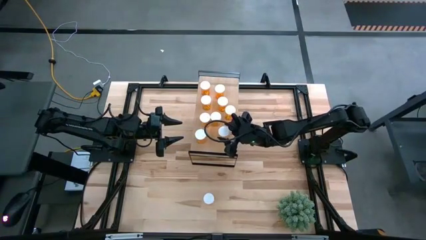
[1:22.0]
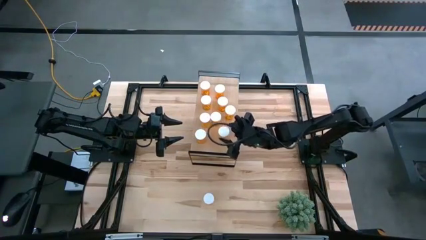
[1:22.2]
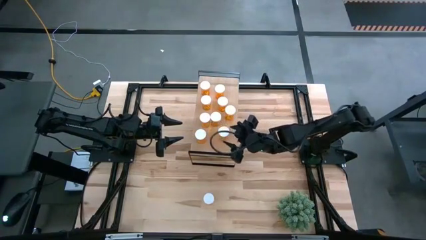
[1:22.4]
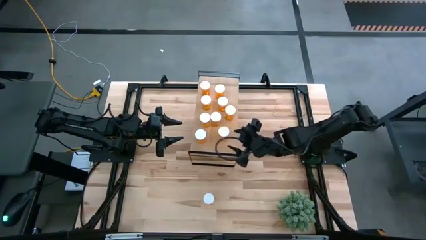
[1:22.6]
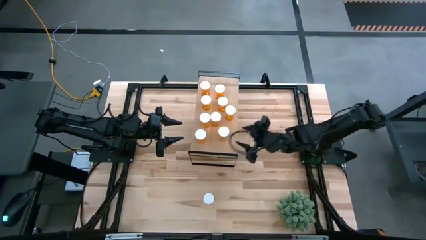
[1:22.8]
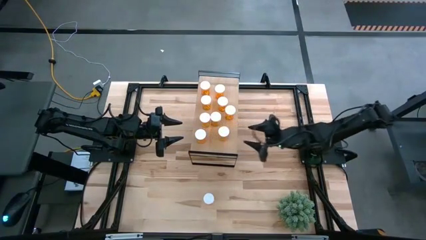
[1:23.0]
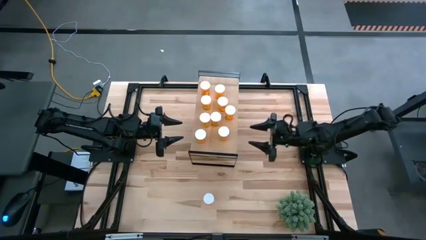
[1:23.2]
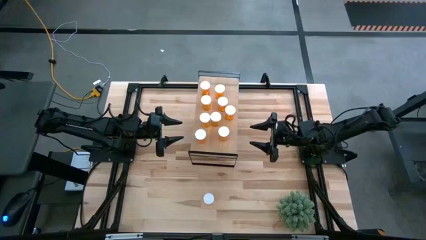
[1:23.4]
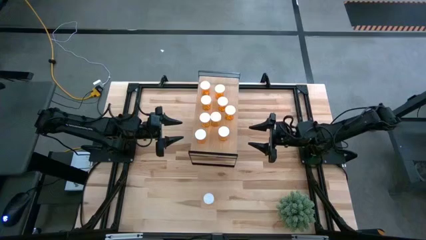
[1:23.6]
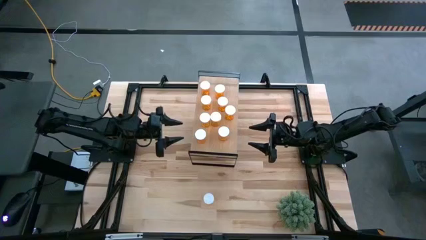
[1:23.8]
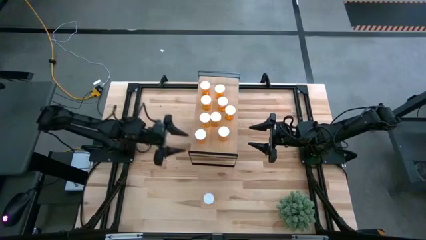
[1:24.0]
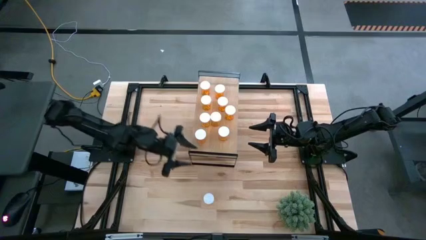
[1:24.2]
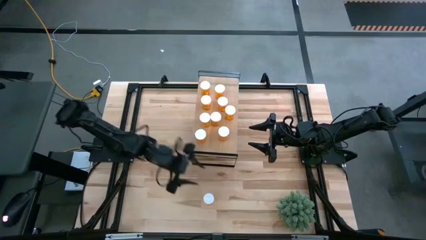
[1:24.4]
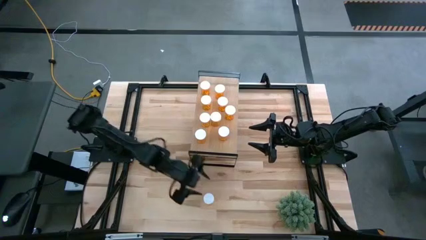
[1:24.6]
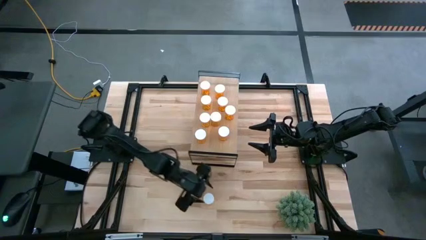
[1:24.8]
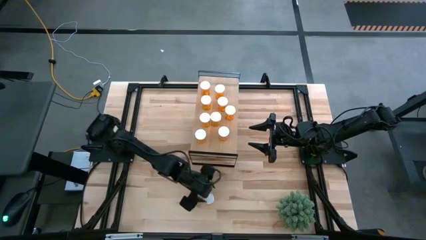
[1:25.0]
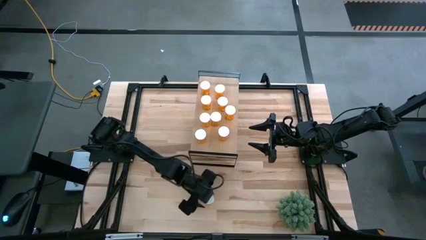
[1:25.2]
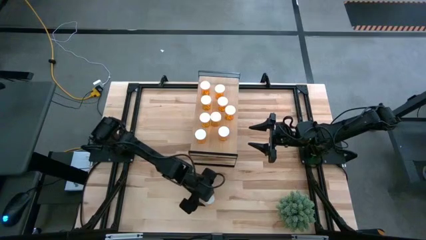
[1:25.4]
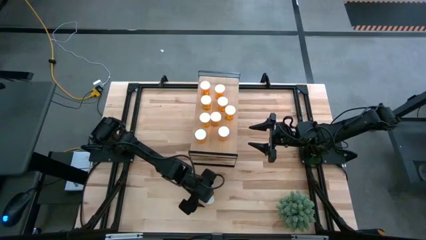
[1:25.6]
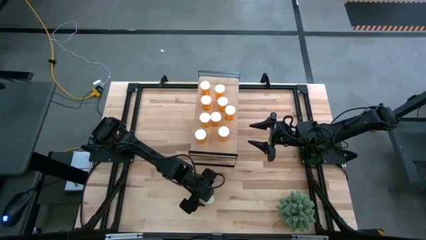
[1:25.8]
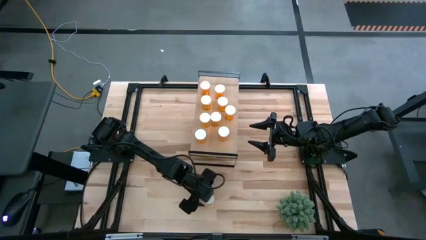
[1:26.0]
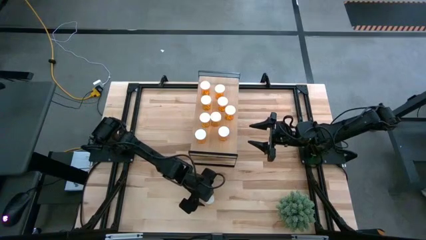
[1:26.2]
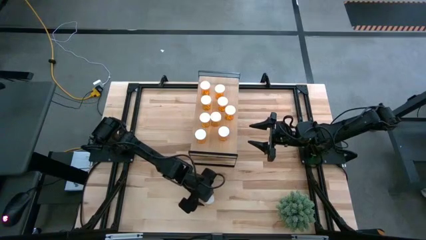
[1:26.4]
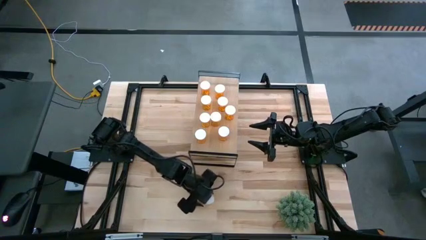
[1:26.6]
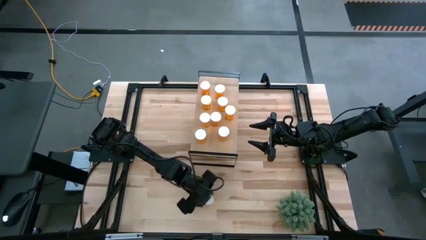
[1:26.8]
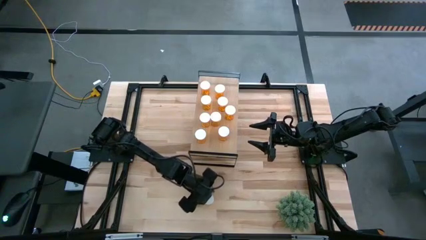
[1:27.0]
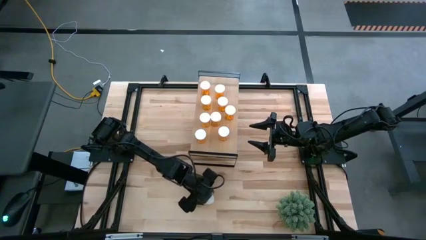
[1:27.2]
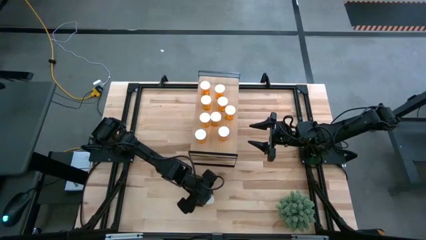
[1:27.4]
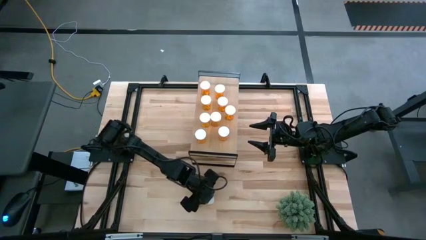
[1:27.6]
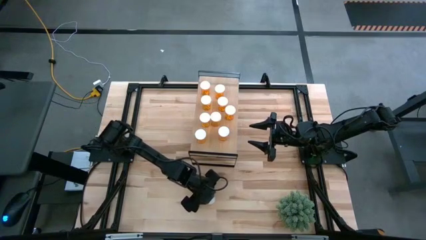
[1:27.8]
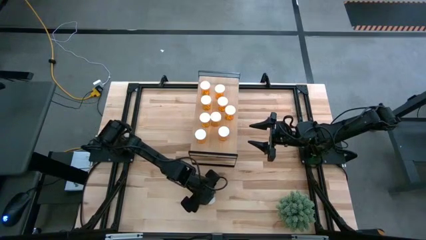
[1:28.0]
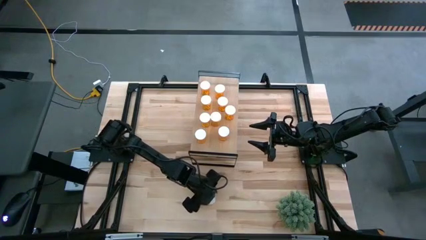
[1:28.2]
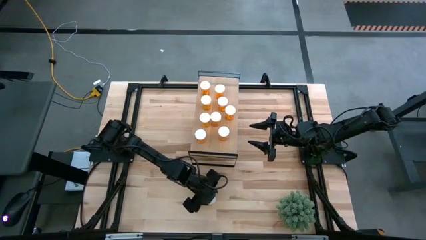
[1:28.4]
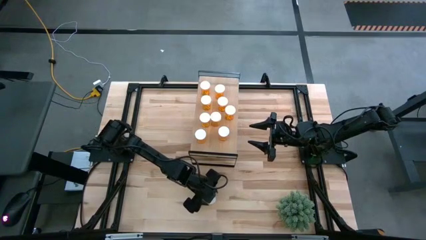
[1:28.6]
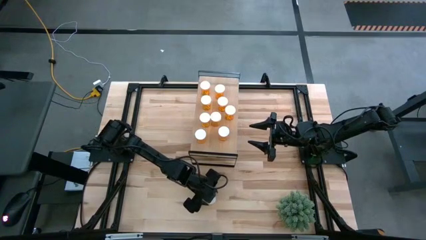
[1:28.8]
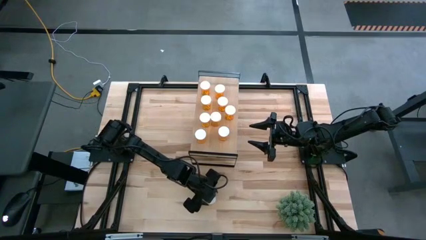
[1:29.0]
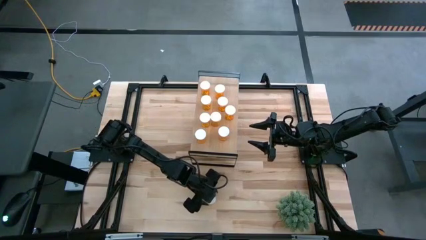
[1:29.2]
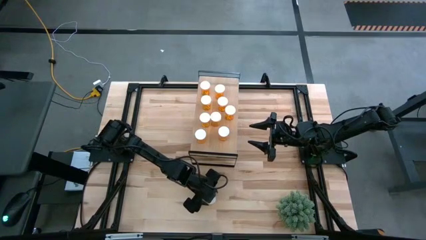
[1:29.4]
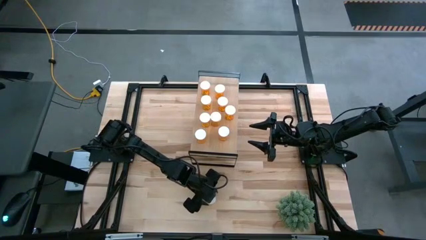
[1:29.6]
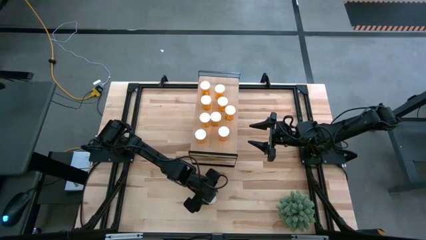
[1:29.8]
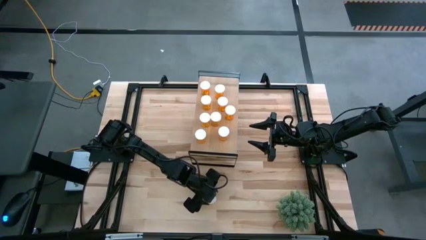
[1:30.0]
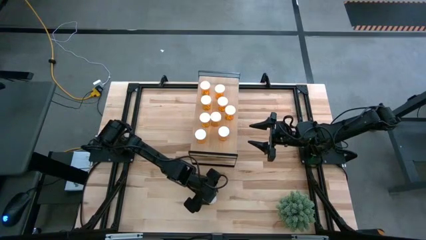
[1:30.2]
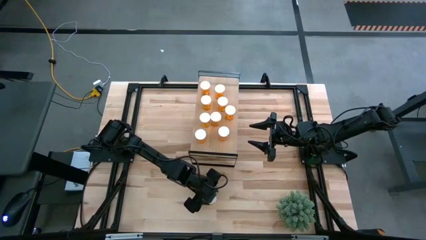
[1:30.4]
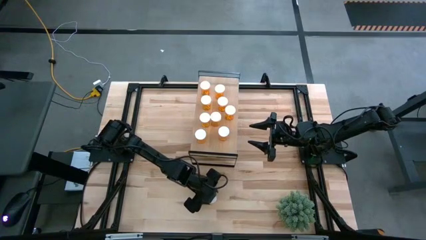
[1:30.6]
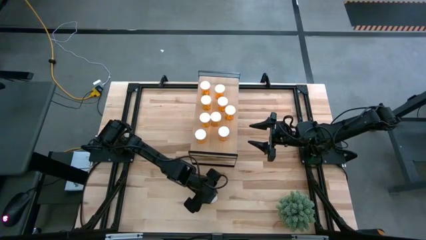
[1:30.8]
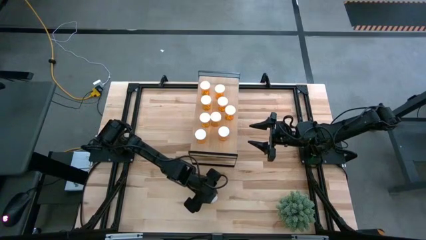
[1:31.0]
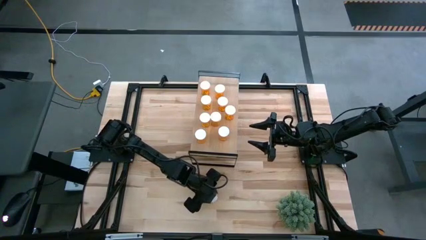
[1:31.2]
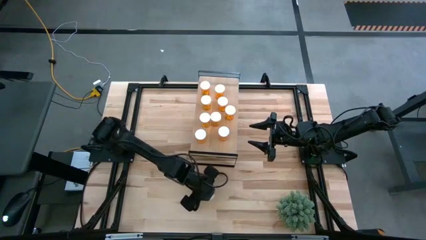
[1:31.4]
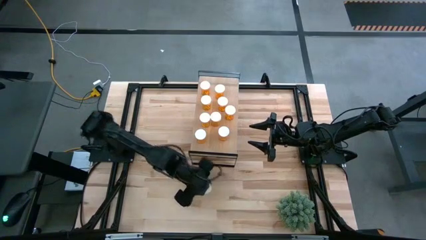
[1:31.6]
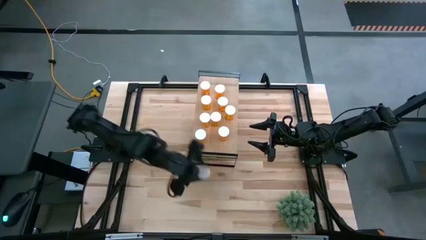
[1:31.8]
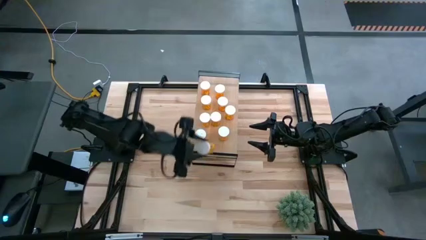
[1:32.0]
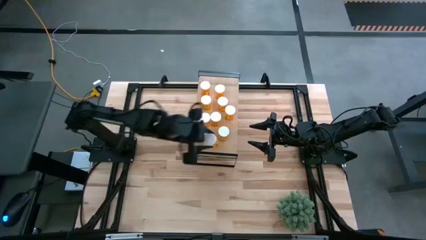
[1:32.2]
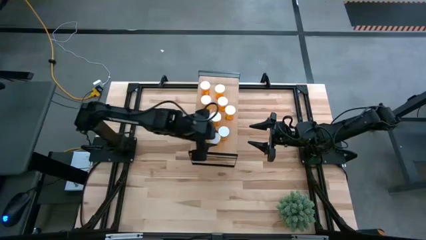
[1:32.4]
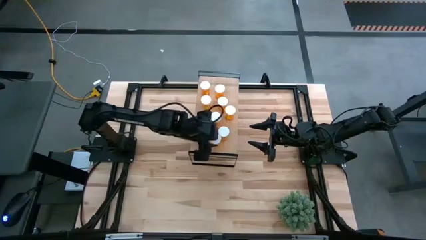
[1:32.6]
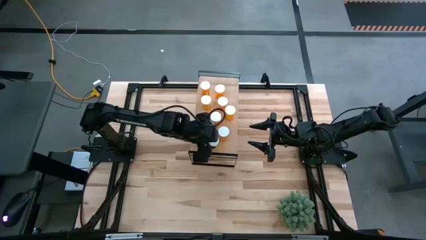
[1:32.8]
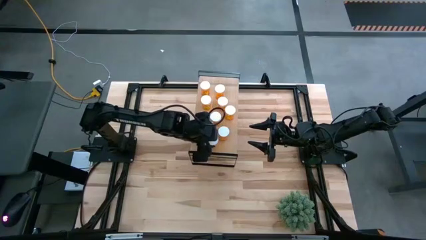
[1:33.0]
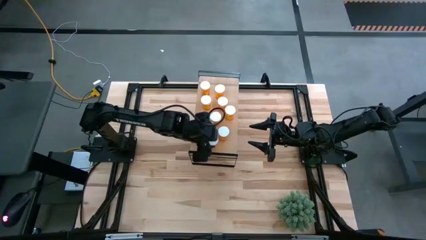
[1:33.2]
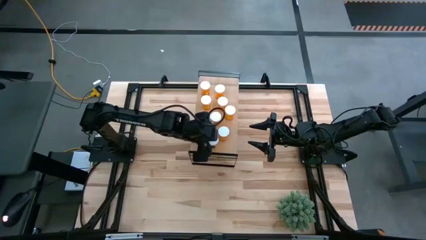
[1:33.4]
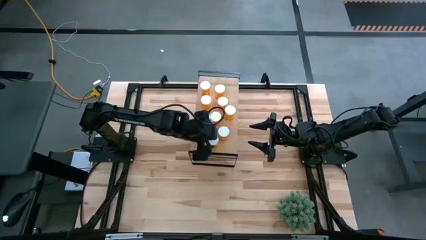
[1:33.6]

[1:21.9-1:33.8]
Task: Pick and place medicine bottles onto shelf by color
Put the orange pill bottle on the shelf

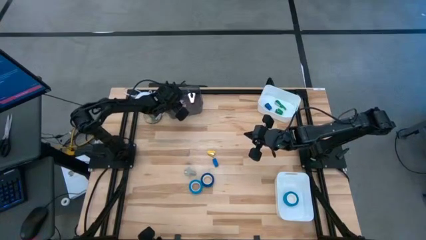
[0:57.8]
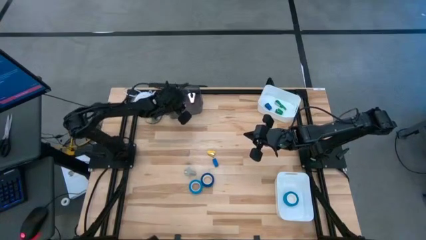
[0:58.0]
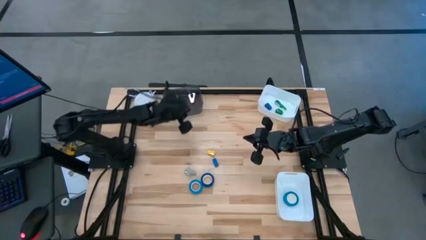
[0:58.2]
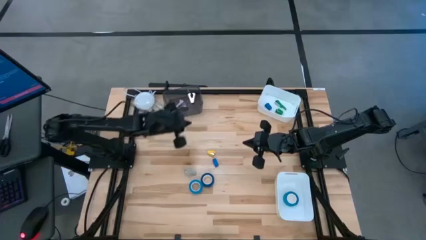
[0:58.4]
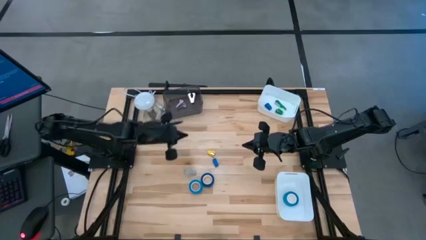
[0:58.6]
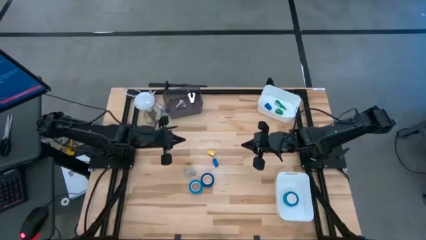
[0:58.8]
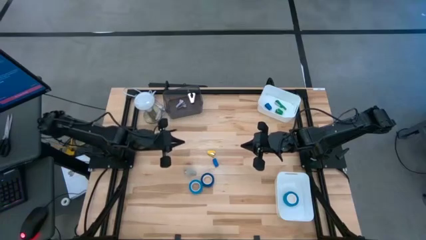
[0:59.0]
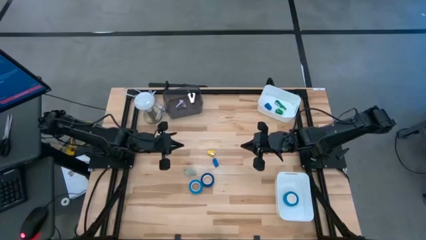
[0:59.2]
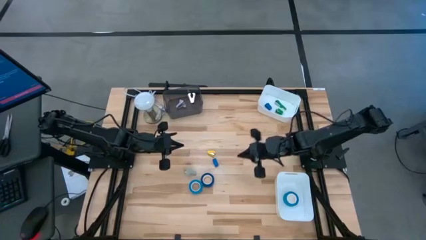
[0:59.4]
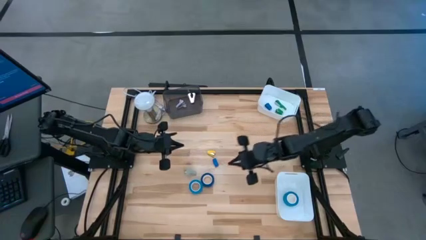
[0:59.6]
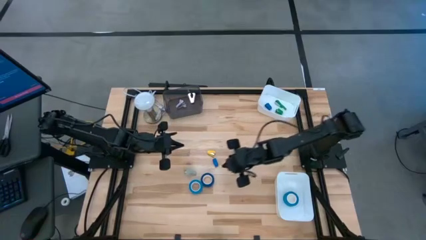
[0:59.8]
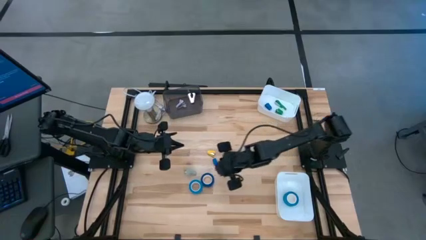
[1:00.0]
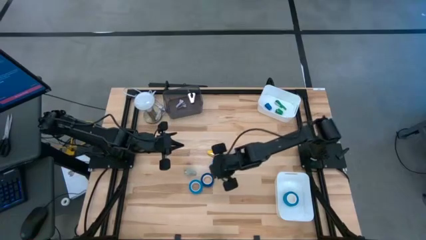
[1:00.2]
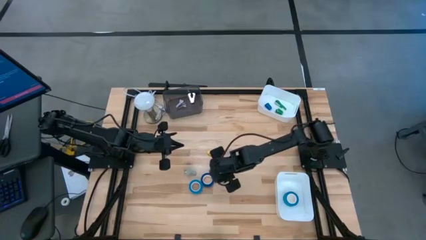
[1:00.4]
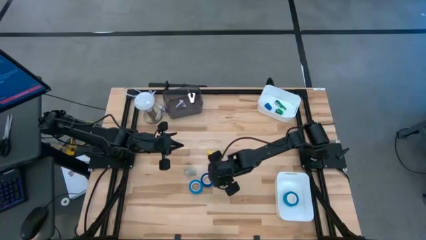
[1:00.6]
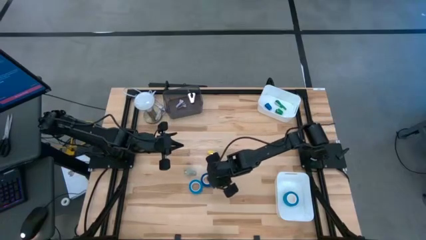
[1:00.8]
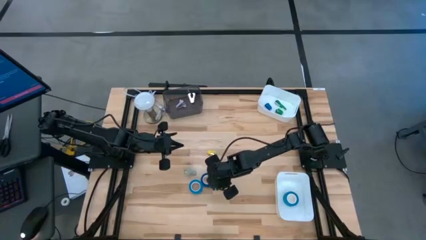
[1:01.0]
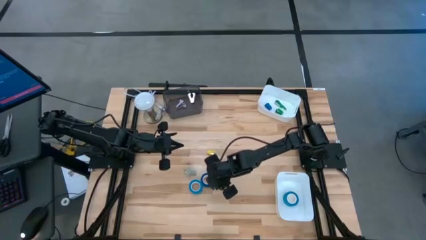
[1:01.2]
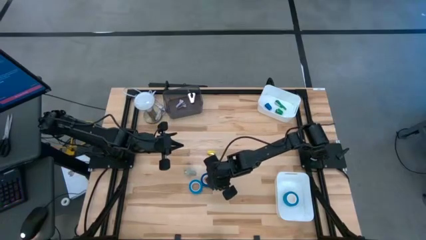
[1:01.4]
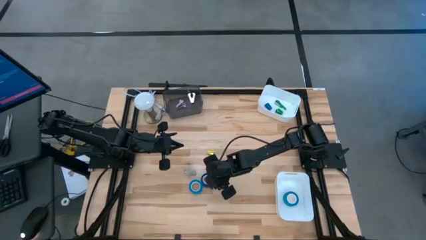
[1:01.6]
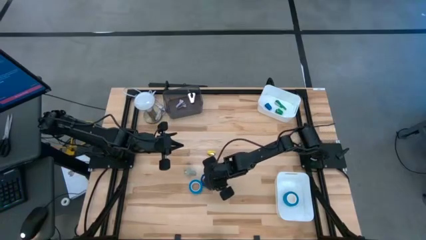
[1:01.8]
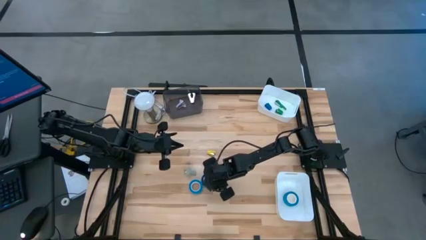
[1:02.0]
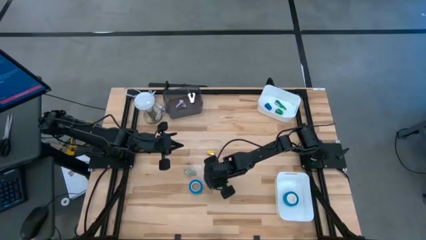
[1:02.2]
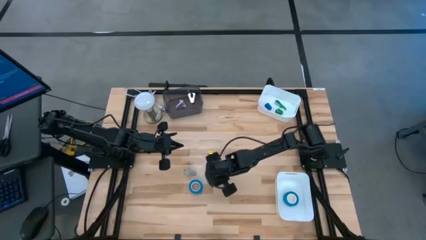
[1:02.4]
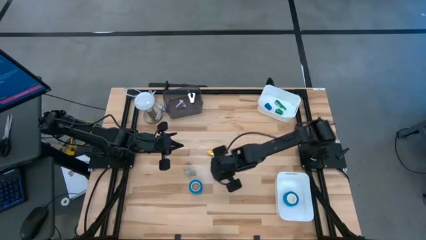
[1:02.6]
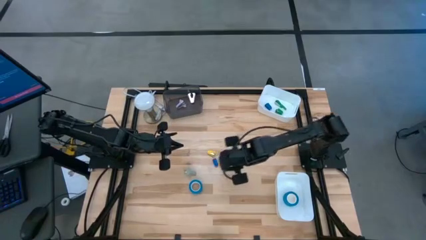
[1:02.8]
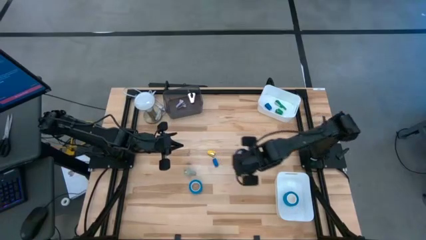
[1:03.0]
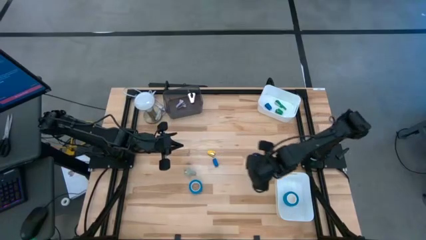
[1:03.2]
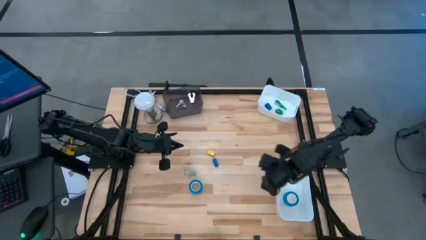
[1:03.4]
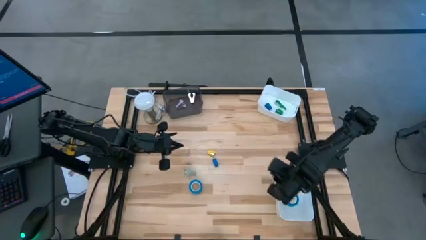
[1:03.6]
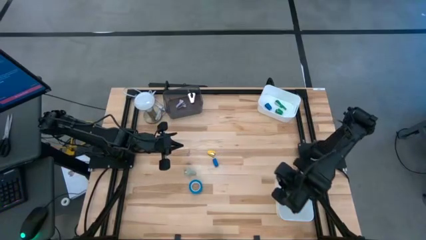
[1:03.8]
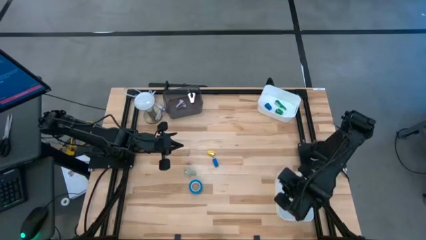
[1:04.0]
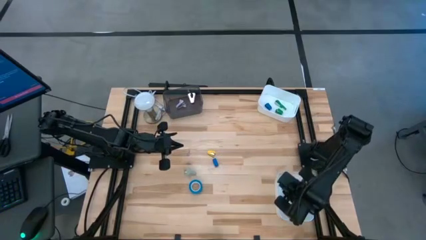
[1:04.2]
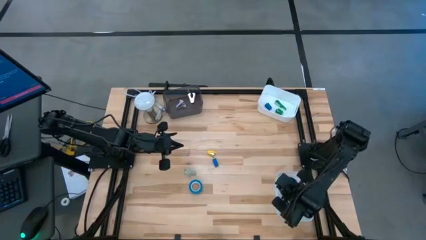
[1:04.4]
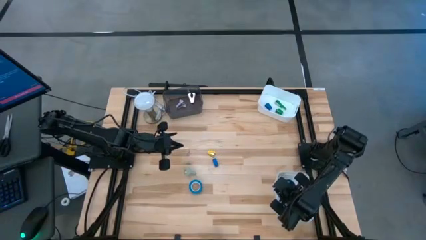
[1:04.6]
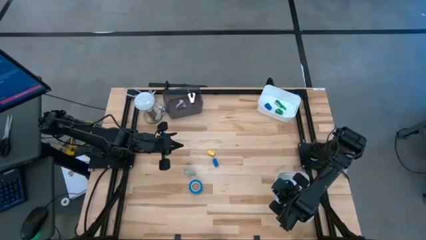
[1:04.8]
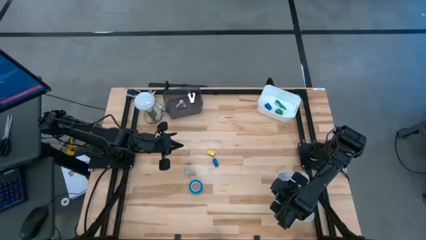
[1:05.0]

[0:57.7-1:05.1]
Task: Pick and place Stapler, Stapler remover, tape
Put the blue tape into the bottom white bin
